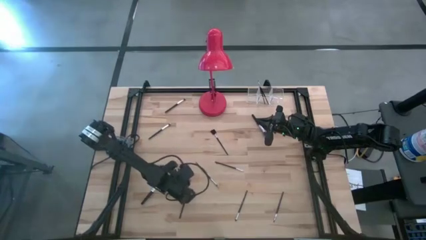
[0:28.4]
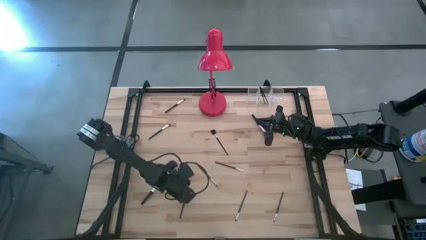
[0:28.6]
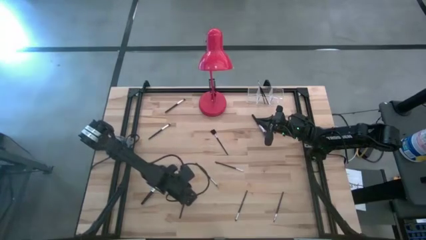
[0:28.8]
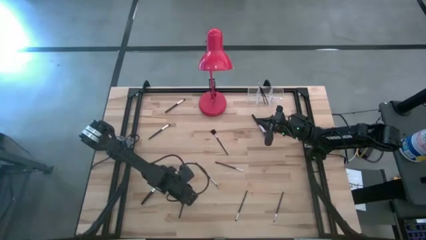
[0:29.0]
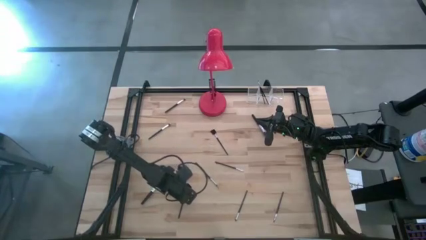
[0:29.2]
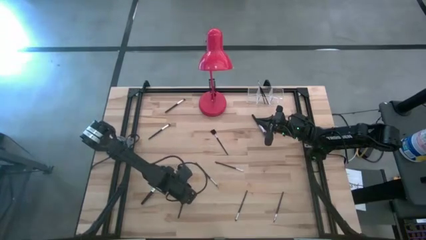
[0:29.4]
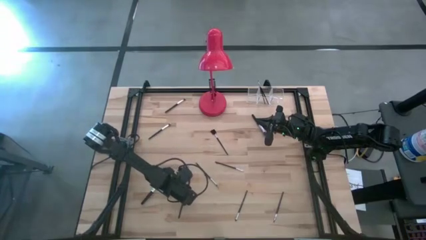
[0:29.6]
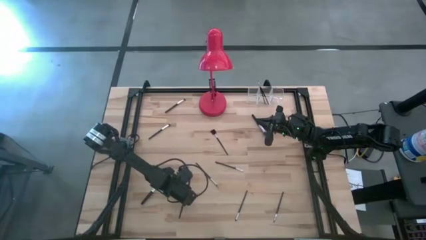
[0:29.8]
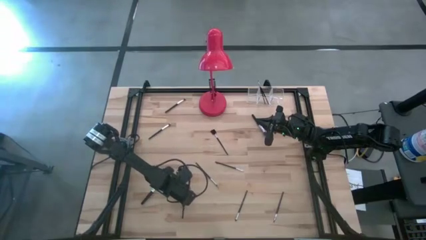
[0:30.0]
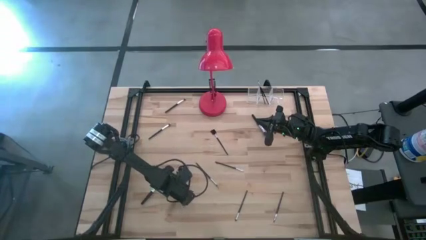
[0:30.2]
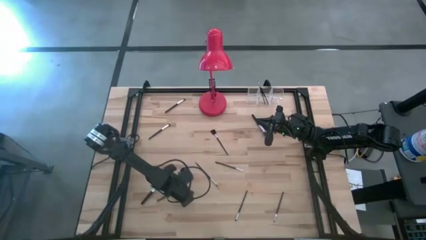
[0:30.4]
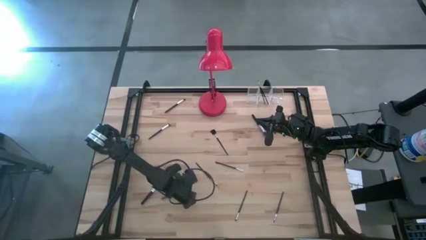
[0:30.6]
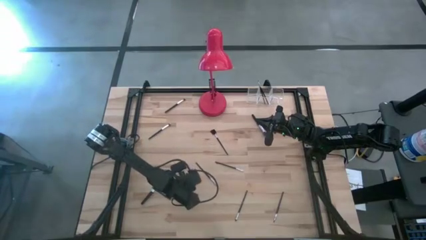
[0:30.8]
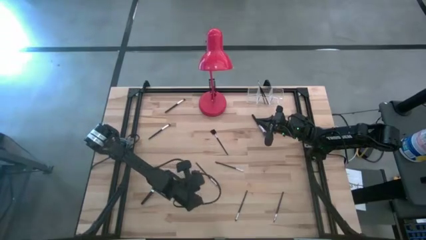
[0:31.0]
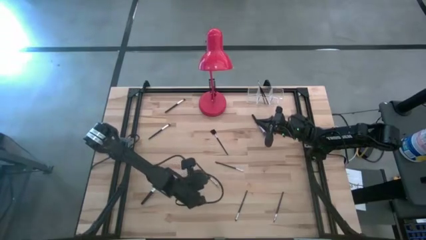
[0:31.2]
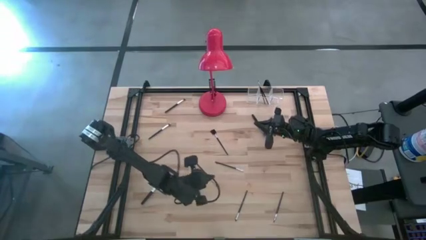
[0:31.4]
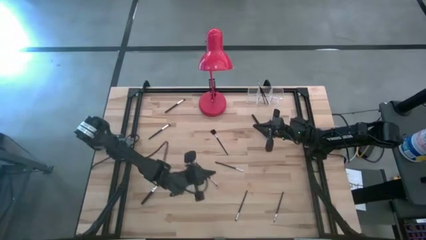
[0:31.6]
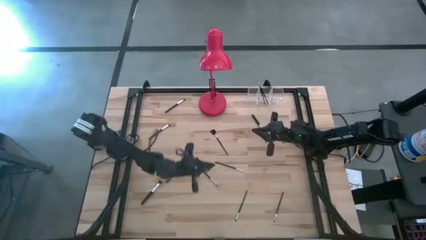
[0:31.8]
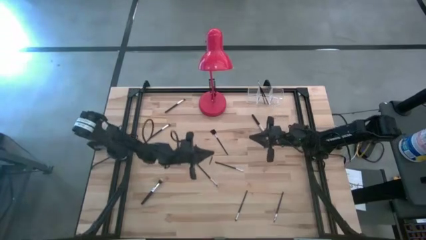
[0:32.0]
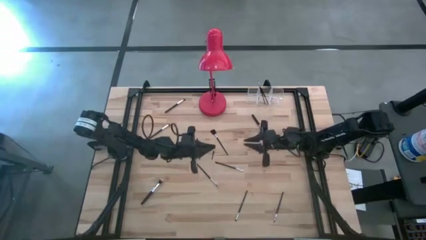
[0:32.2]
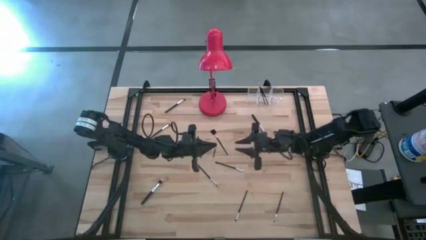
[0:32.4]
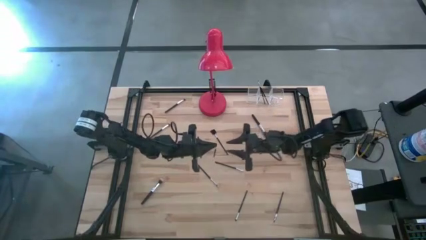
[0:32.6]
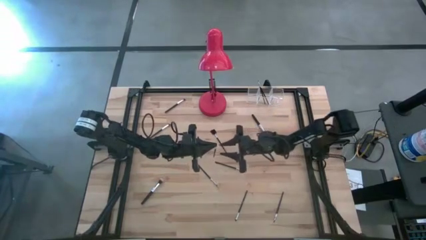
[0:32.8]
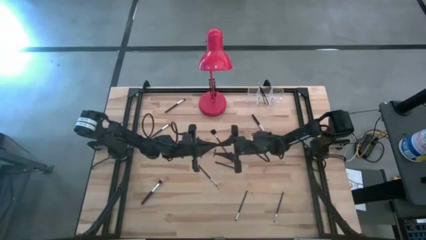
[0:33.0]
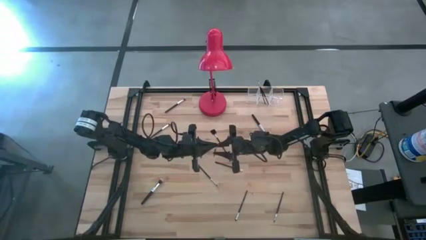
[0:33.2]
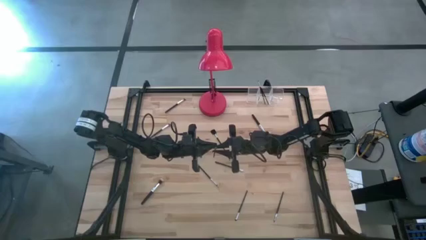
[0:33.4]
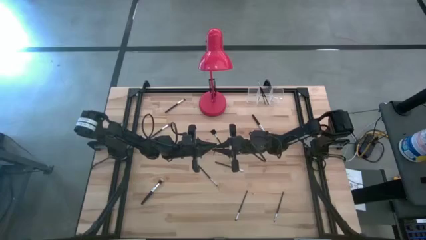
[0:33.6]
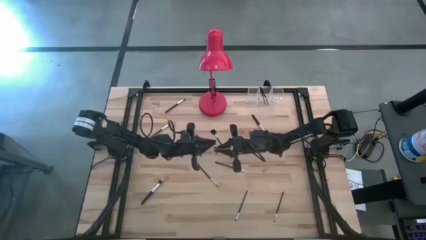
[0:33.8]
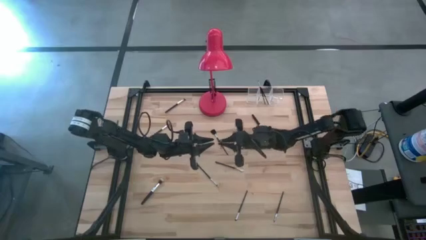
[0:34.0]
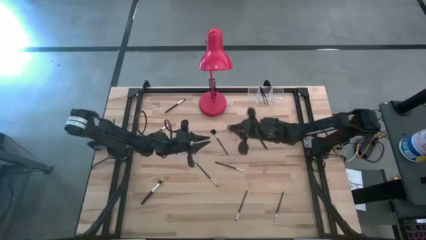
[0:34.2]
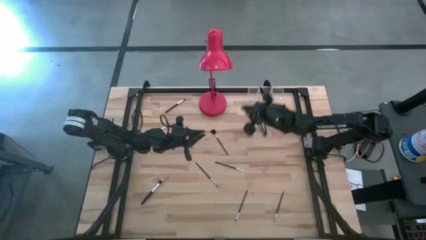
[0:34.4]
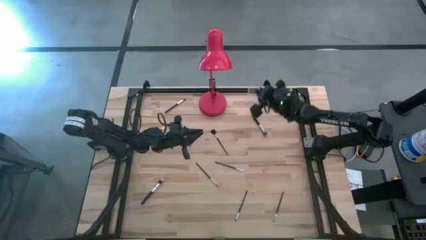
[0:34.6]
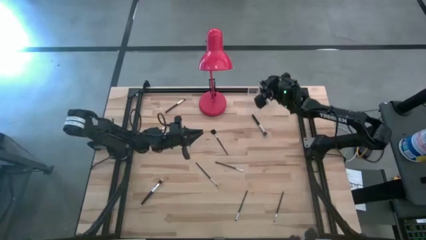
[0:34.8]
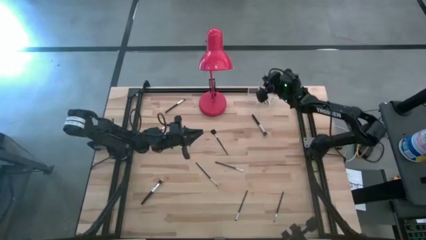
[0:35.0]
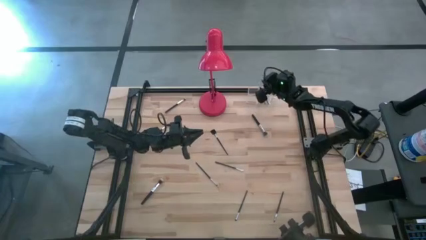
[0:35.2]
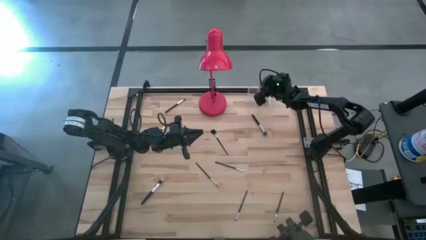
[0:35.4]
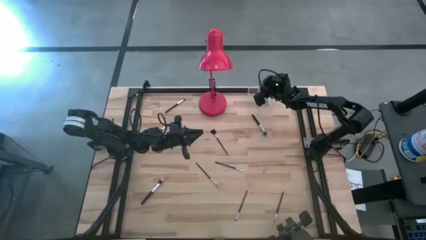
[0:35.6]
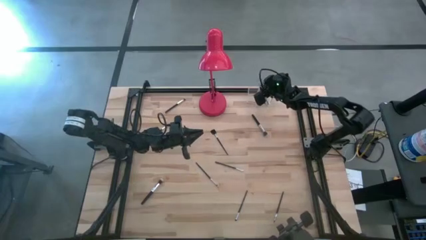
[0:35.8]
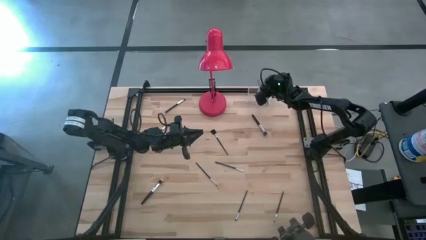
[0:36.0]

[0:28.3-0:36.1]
Task: Sort items
Put the black eyeshadow brush into the transparent organizer

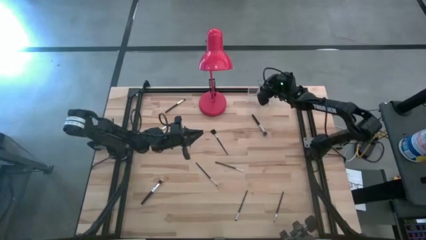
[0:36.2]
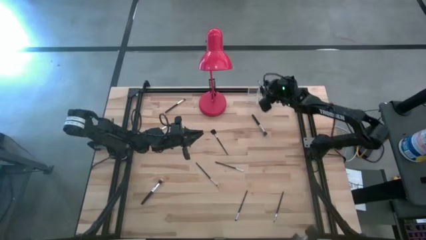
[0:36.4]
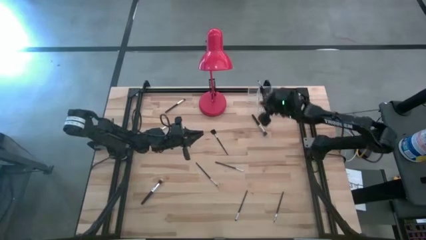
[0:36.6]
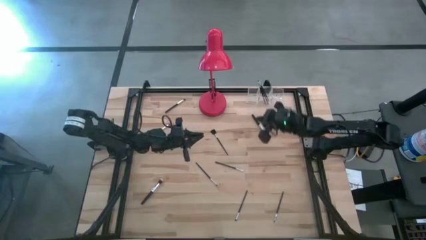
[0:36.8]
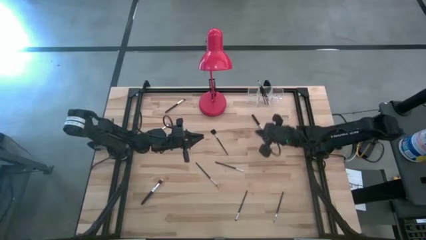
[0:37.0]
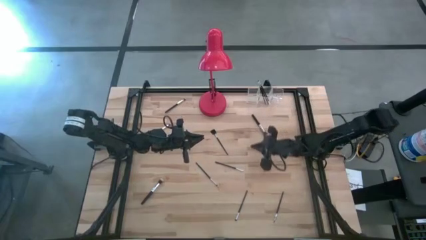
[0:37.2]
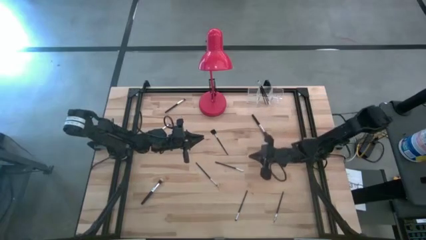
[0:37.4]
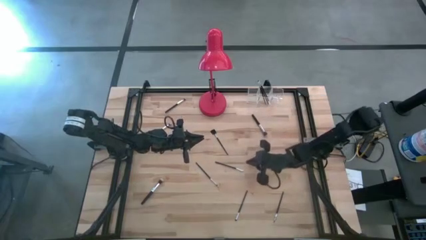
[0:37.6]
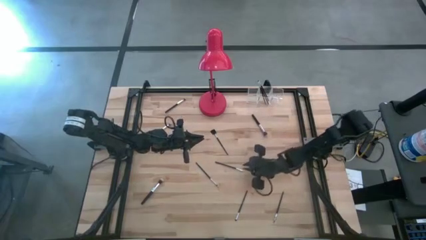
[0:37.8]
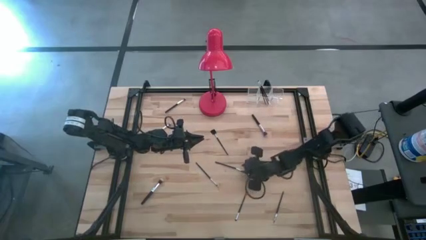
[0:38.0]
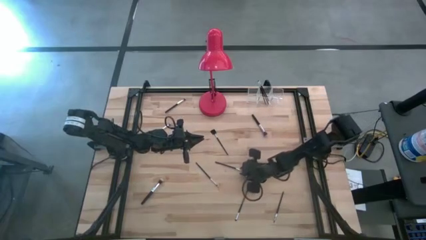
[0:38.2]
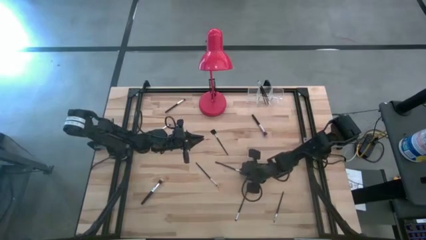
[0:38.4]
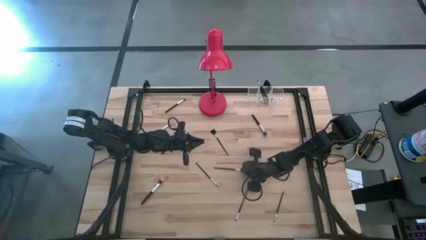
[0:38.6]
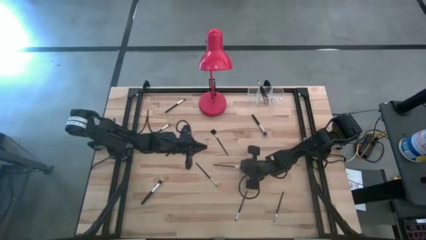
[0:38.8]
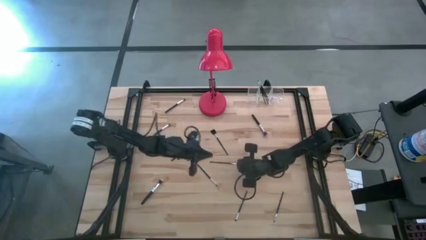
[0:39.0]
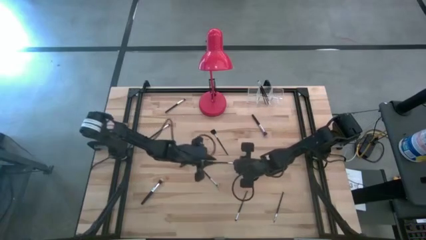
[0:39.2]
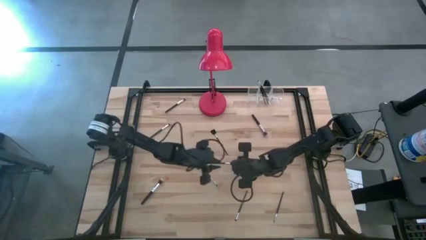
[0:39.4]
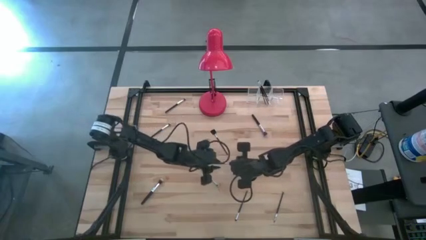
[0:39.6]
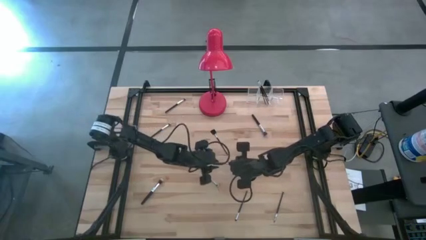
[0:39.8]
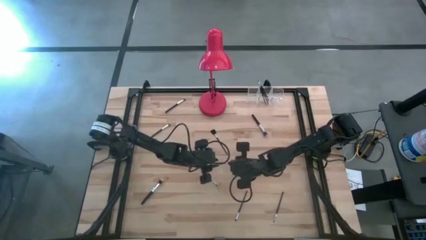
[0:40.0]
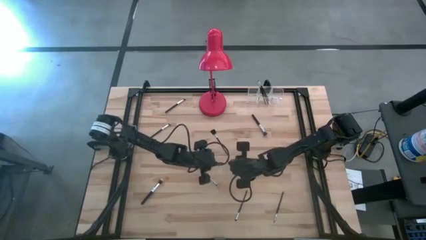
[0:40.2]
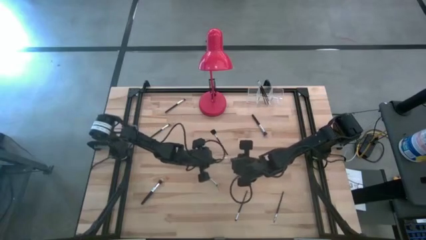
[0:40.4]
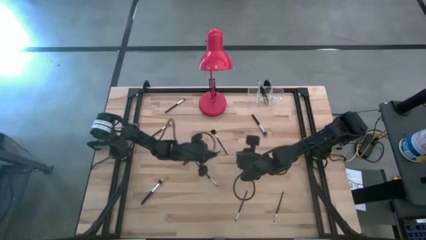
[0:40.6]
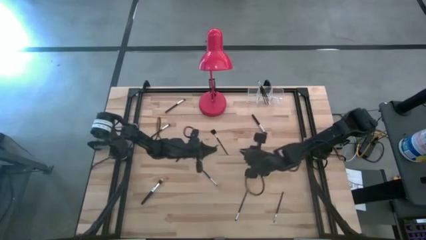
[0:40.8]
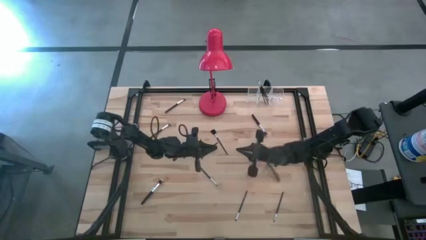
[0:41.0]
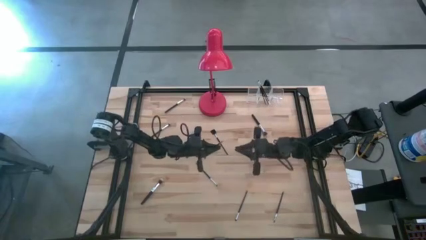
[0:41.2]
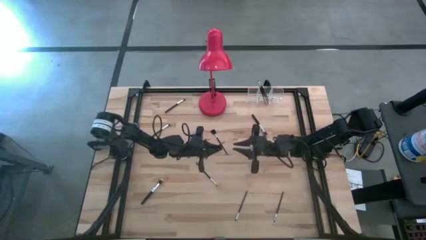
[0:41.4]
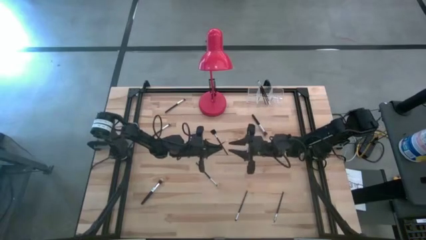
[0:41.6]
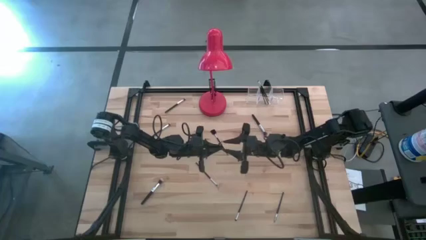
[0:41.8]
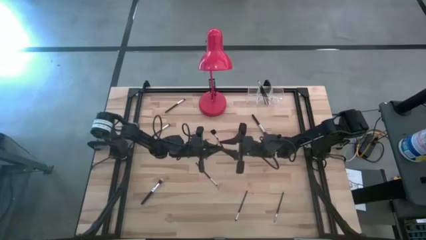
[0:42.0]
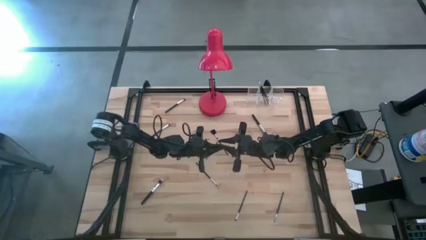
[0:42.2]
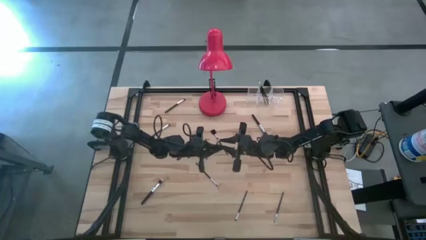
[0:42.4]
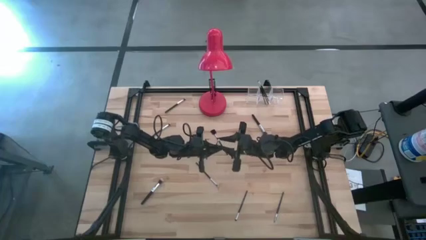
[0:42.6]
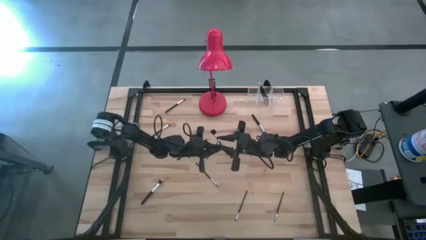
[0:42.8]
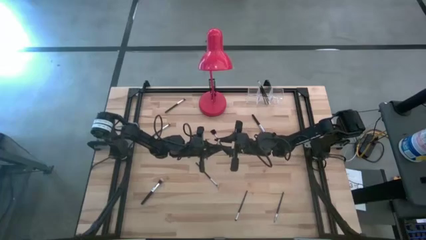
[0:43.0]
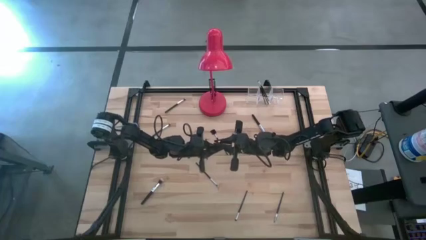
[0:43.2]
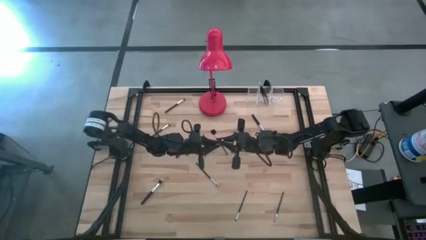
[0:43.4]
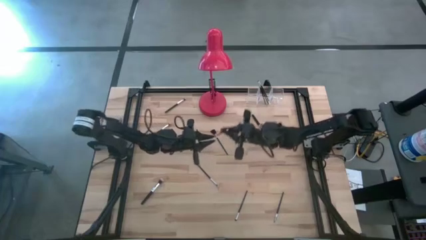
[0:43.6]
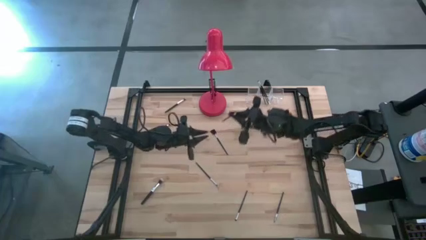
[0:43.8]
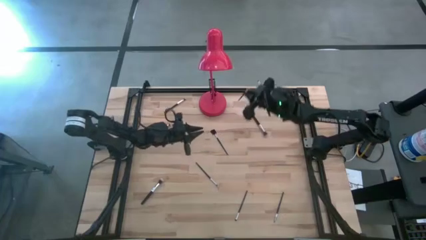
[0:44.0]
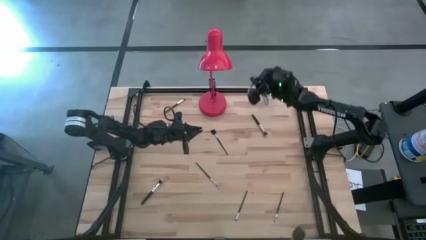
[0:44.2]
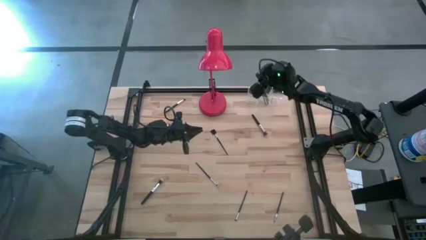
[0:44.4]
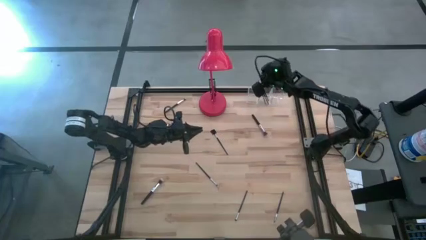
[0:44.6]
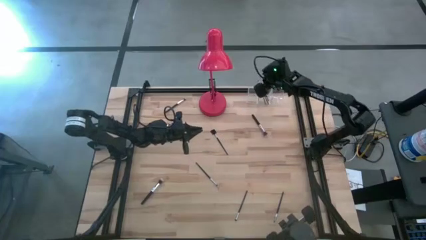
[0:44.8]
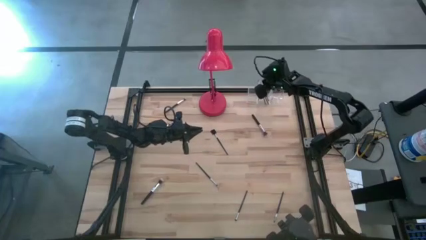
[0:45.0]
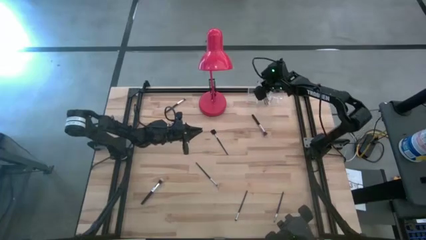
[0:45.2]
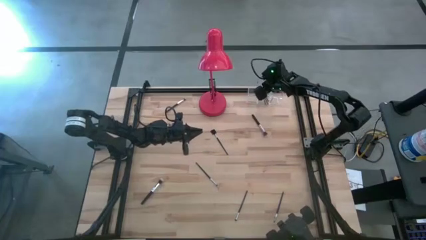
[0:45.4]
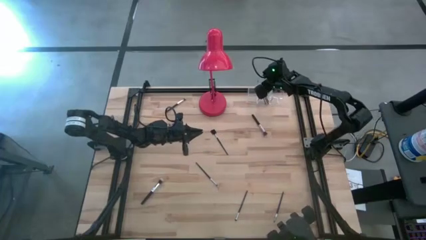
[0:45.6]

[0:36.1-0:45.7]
Put the white eyeshadow brush into the transparent organizer
